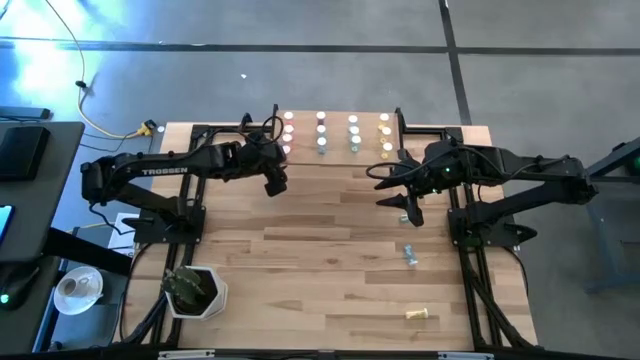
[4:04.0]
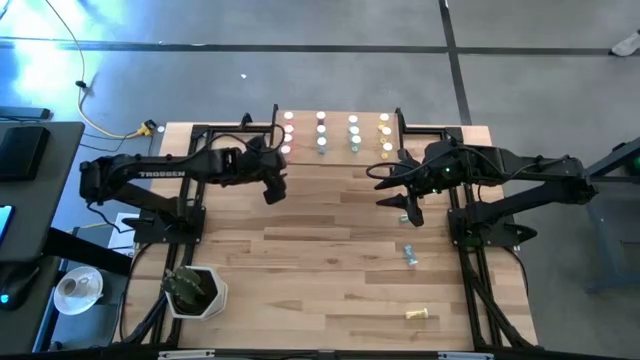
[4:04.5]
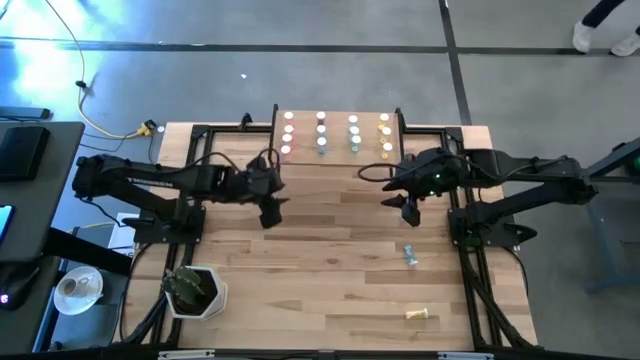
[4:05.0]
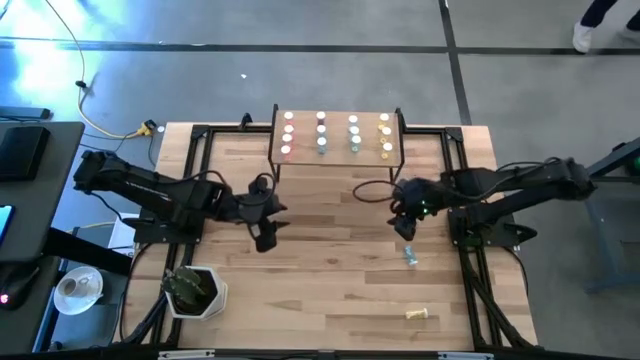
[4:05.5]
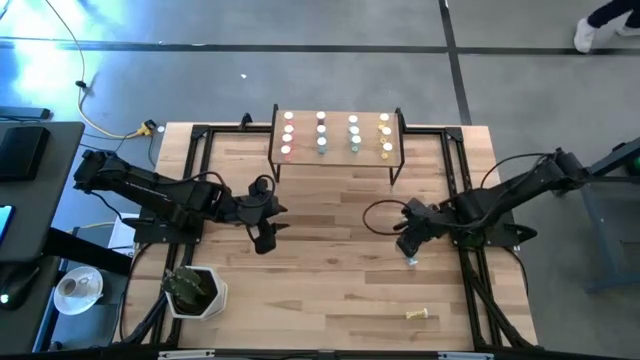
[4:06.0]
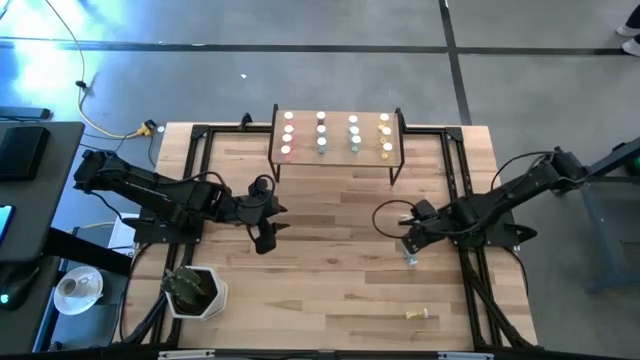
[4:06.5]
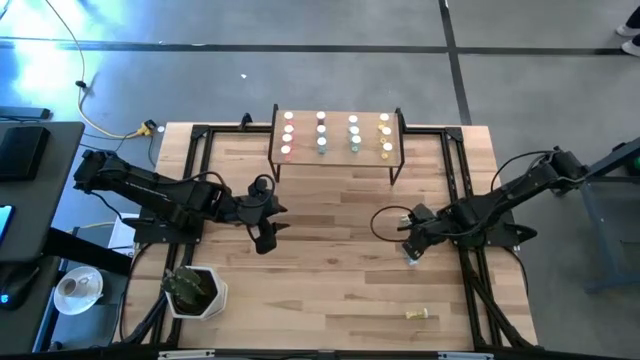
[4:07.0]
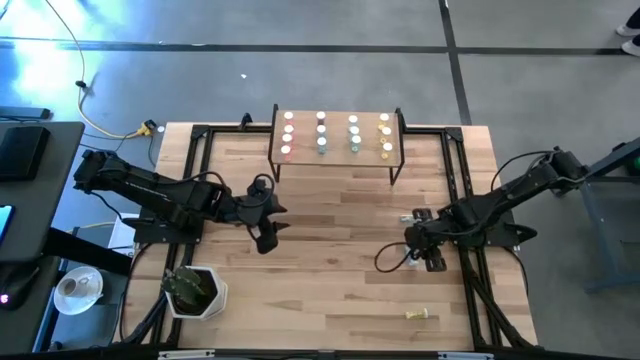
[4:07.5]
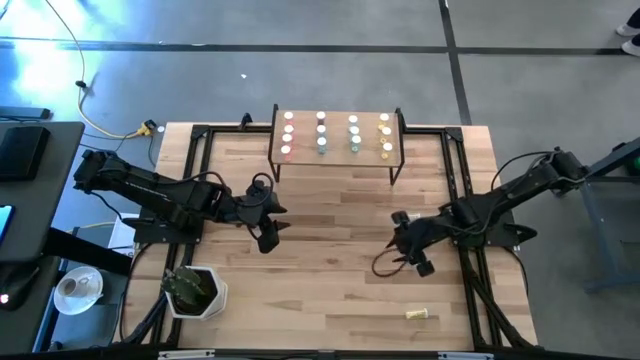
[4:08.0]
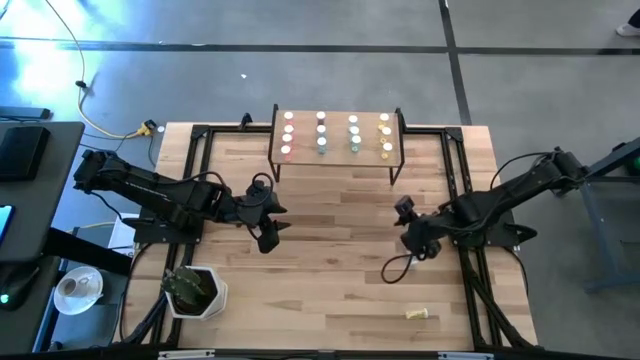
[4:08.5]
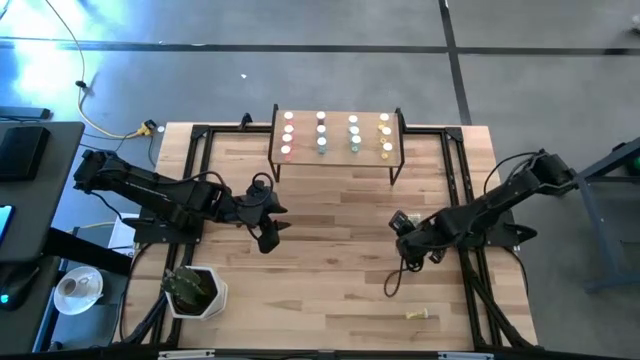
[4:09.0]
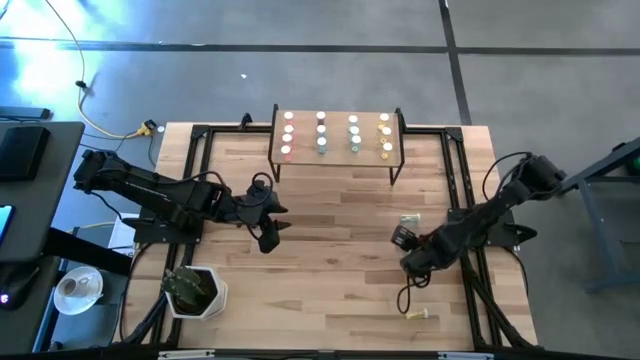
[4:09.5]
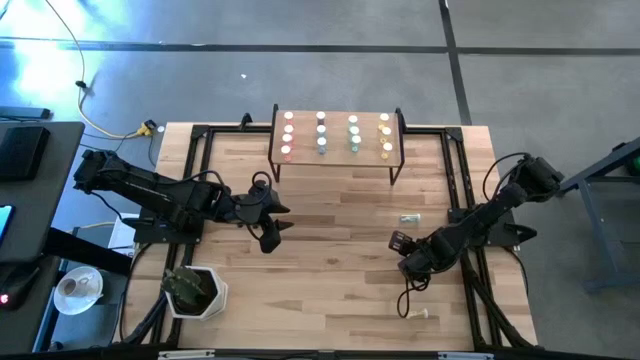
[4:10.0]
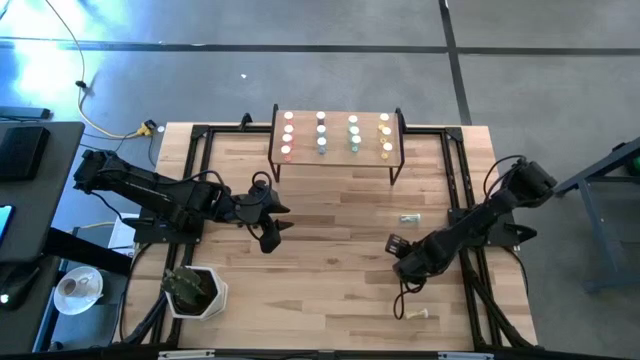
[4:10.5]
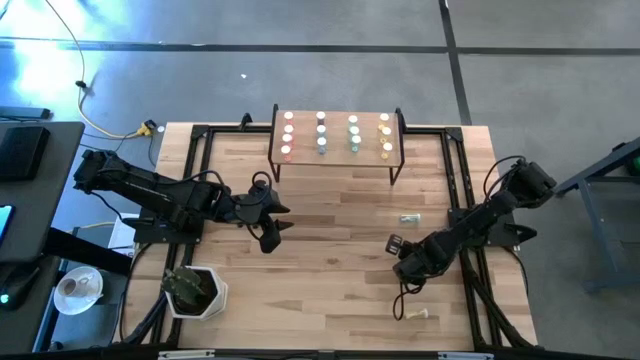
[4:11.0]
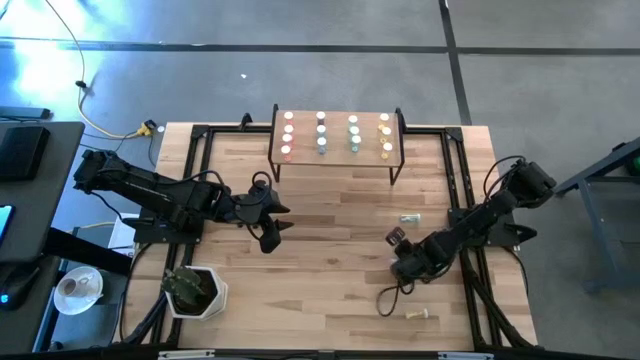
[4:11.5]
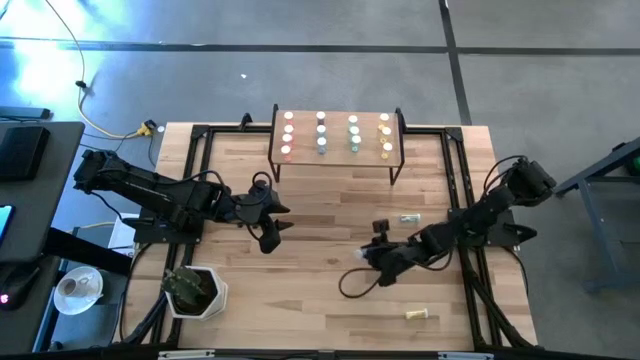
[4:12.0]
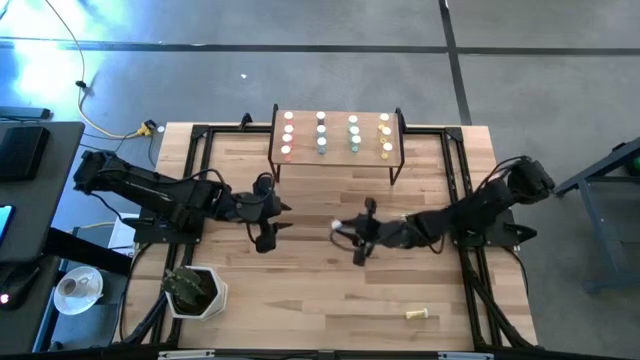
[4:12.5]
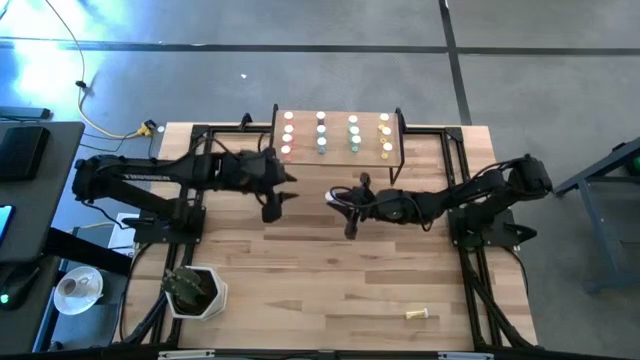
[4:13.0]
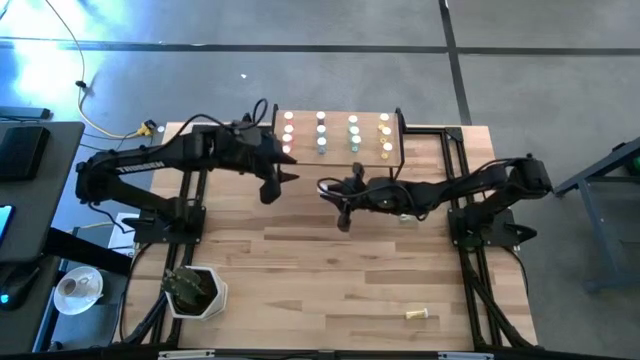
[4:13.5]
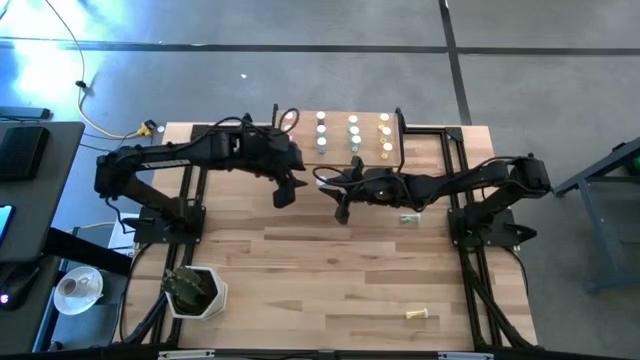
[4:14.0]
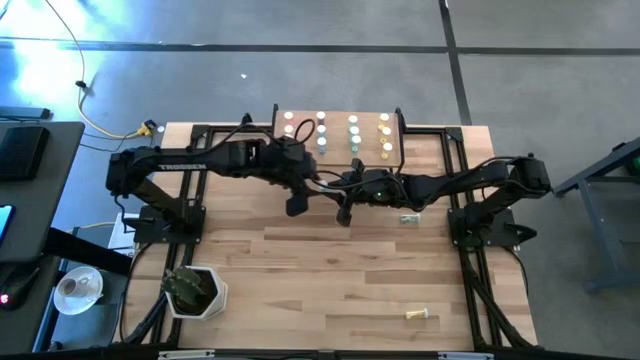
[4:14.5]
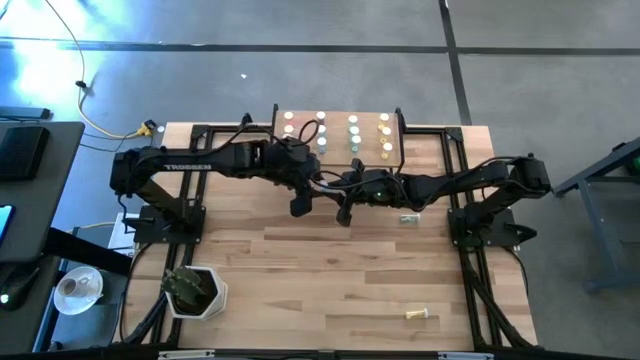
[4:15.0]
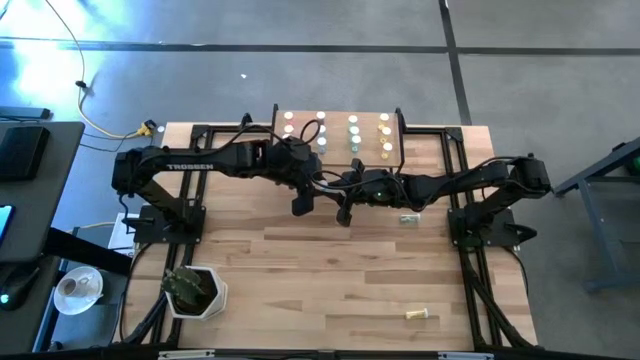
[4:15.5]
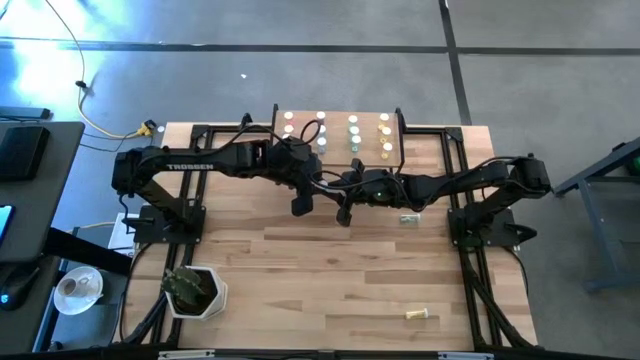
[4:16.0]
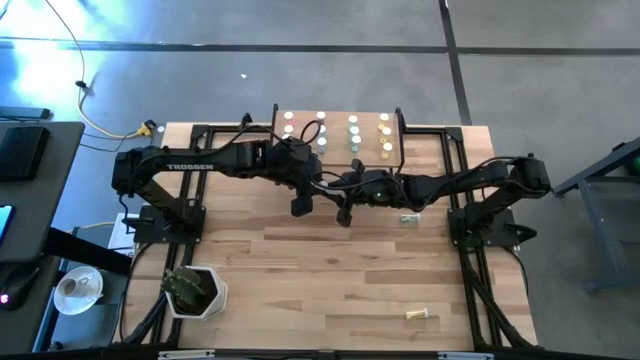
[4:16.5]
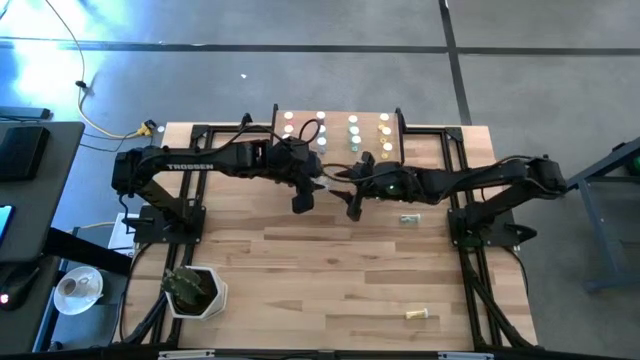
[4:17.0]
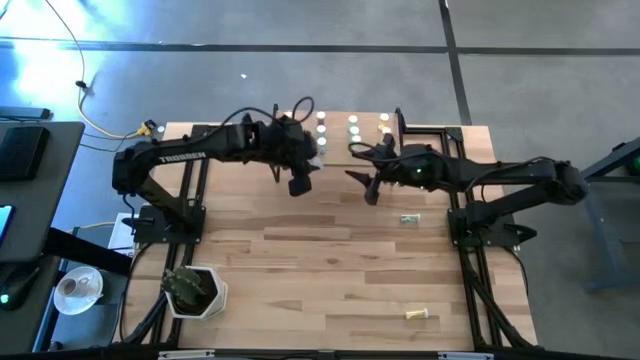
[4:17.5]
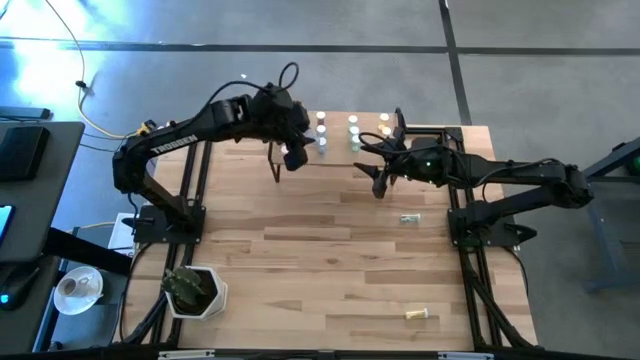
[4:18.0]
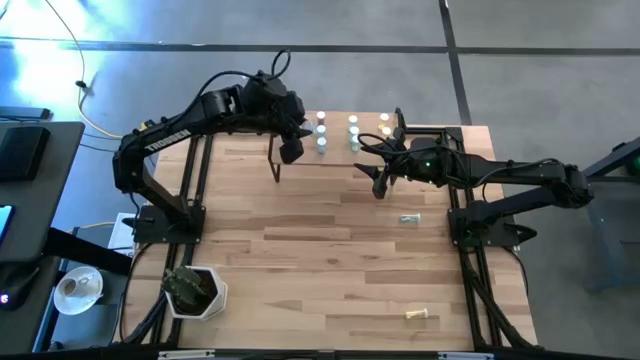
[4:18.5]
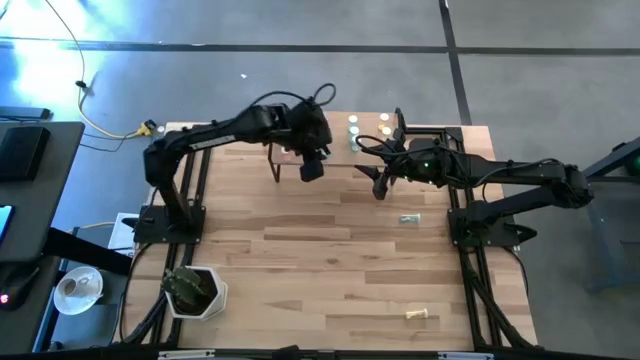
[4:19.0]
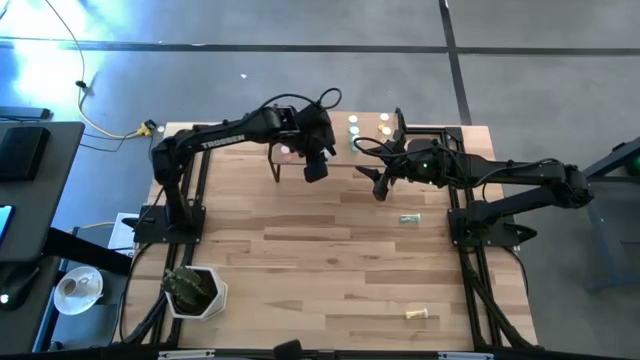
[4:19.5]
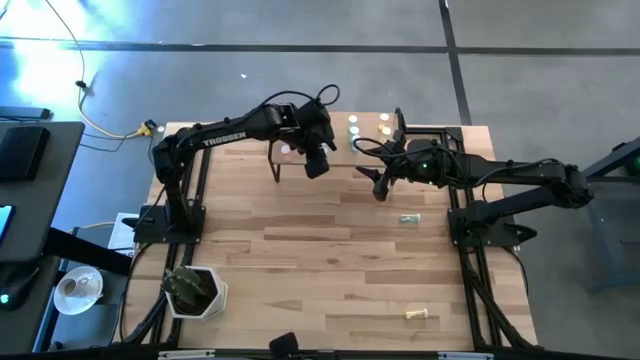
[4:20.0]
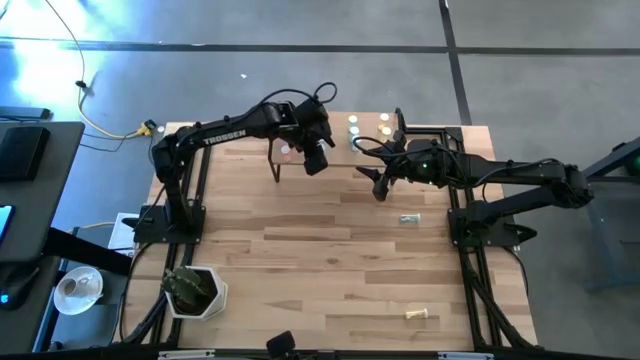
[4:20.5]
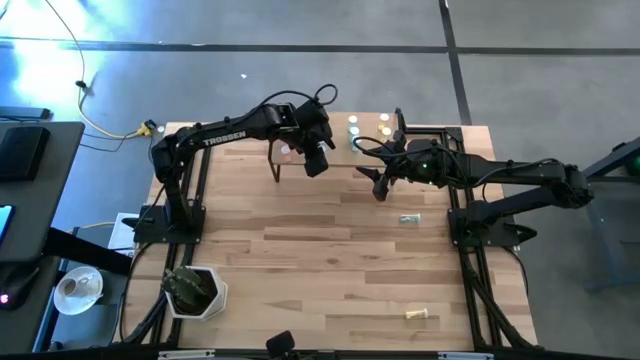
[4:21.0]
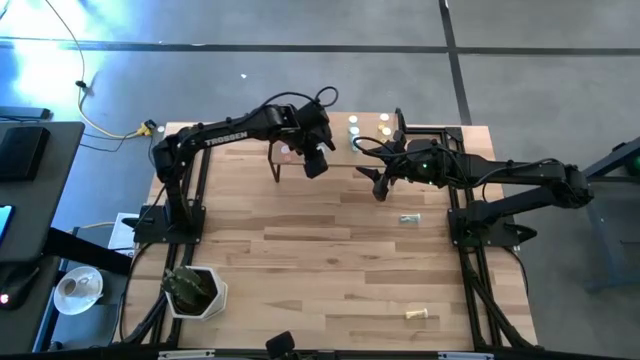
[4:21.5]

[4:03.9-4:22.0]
Task: Pick and place medicine bottles onto shelf by color
Put the blue pill bottle on the shelf aligned with the other blue pill bottles

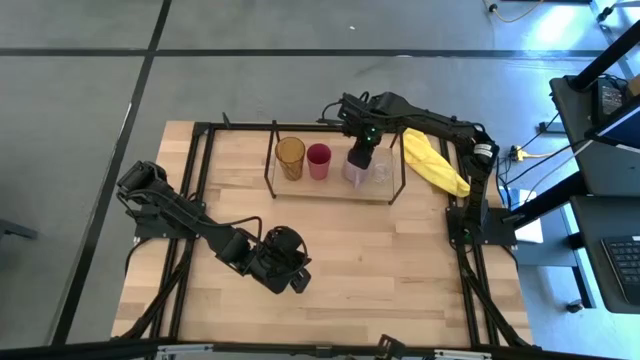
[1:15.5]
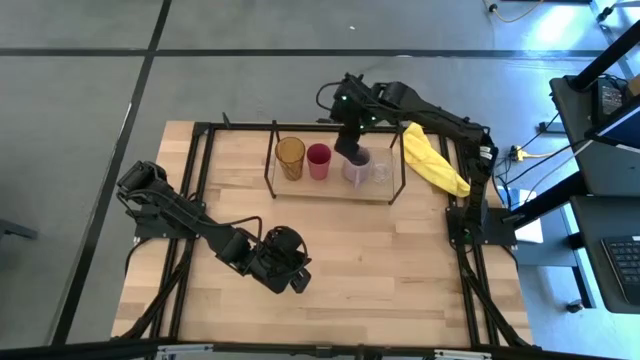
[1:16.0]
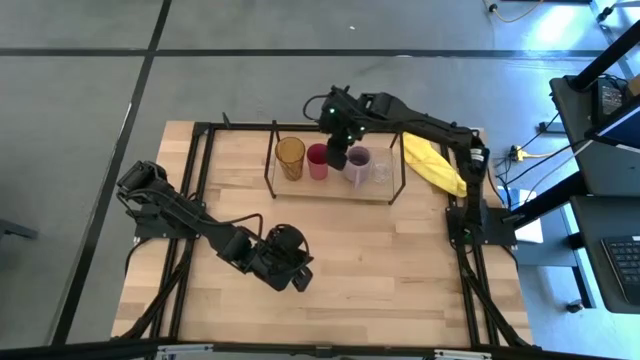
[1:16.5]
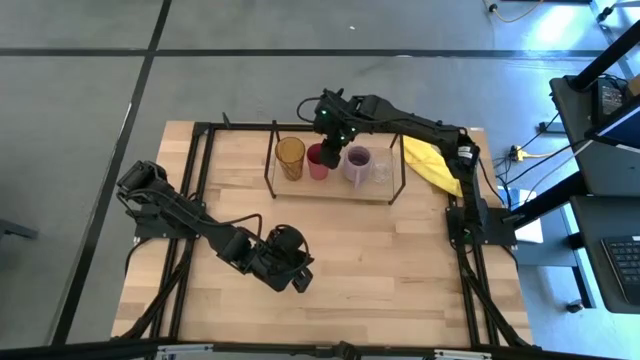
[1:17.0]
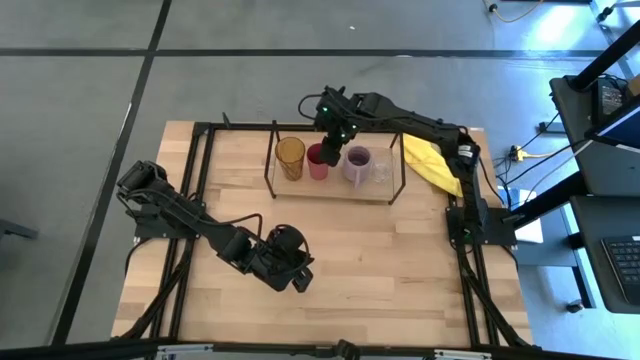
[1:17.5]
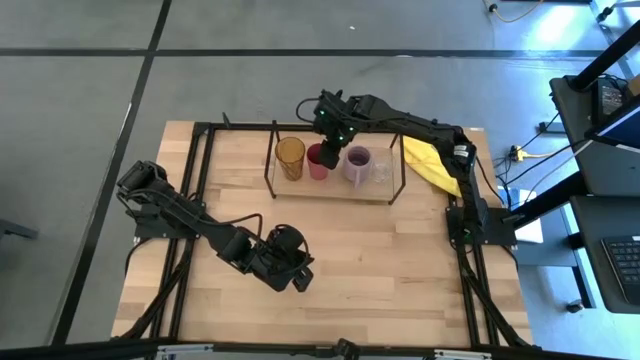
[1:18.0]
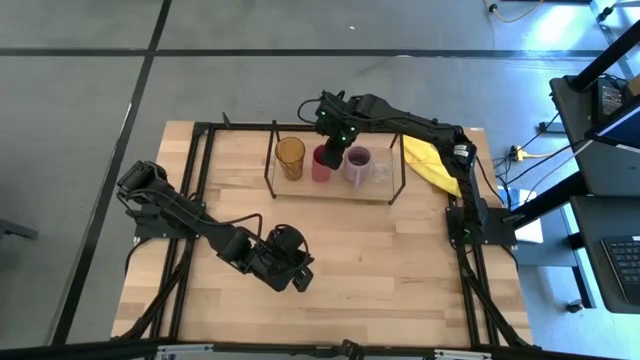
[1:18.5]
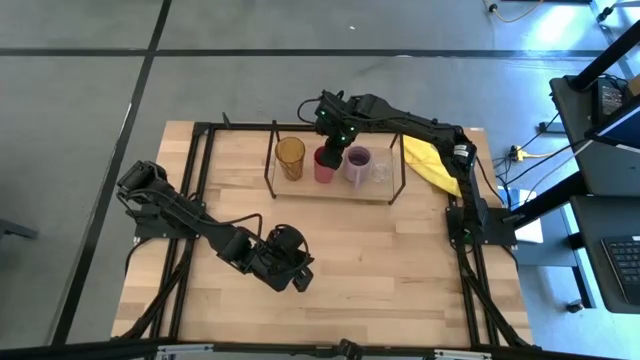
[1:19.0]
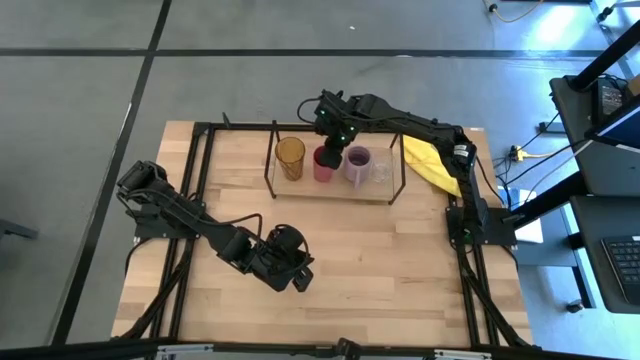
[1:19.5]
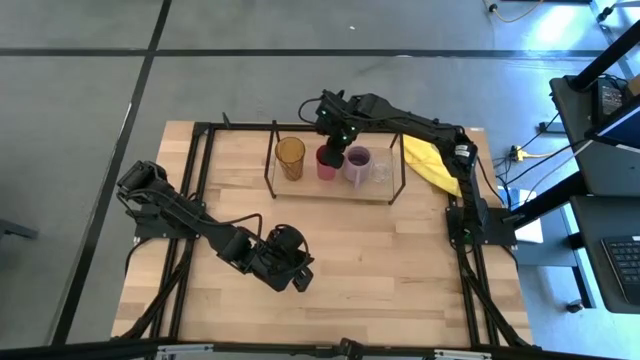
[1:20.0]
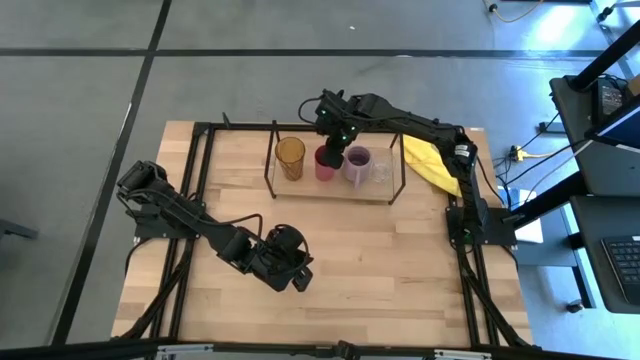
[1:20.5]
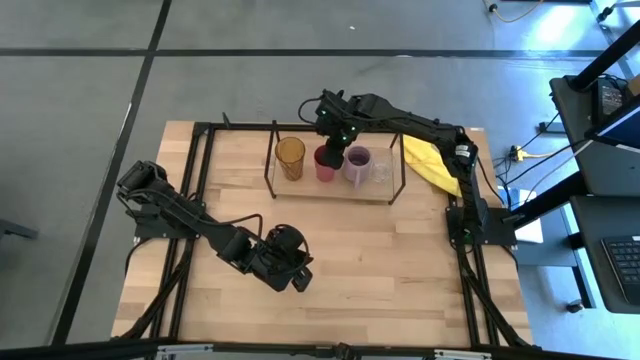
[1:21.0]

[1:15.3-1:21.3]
Task: Stack small to large cups/mugs on shelf
Adjust the pink cup on the shelf
